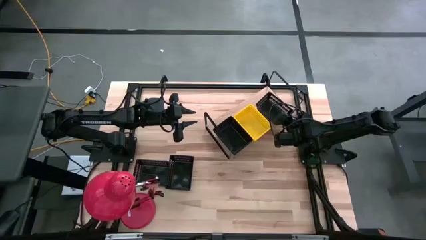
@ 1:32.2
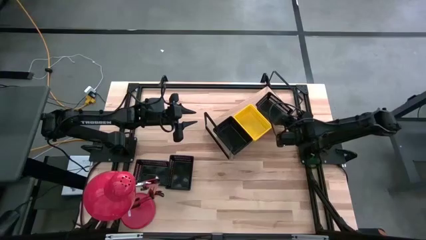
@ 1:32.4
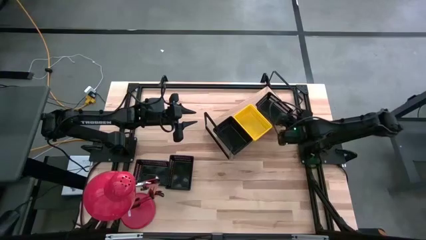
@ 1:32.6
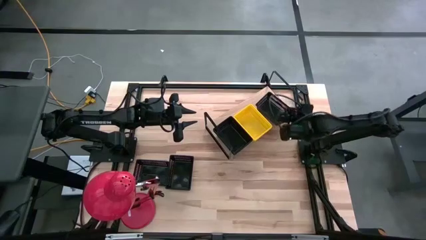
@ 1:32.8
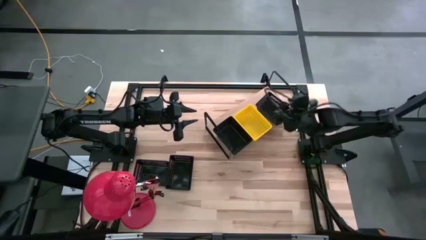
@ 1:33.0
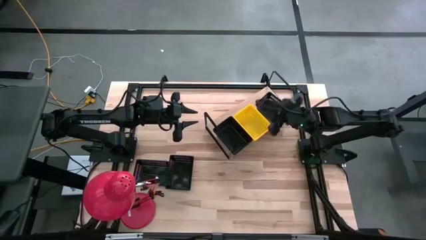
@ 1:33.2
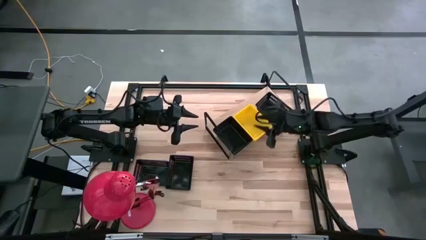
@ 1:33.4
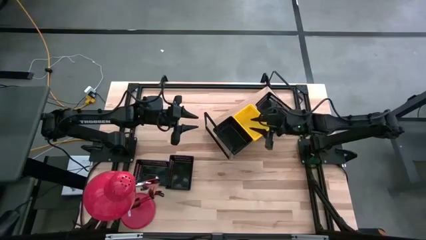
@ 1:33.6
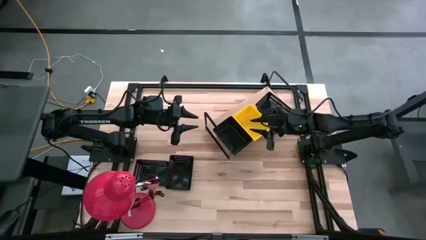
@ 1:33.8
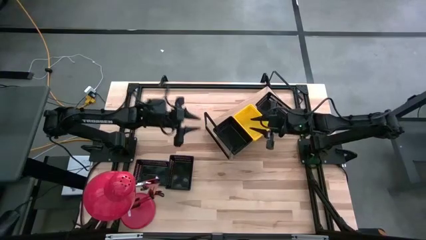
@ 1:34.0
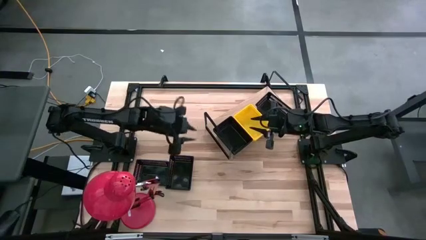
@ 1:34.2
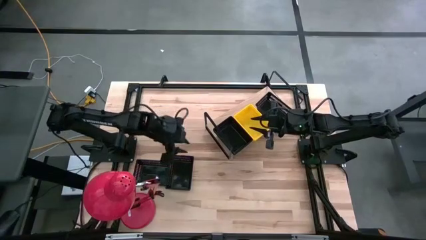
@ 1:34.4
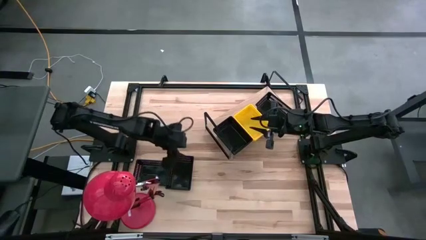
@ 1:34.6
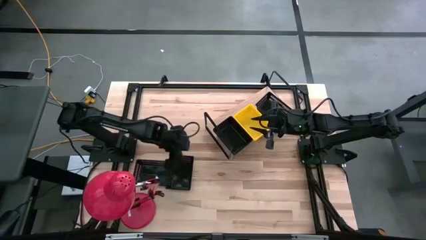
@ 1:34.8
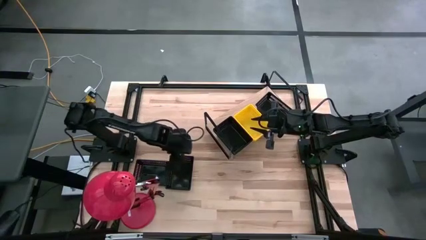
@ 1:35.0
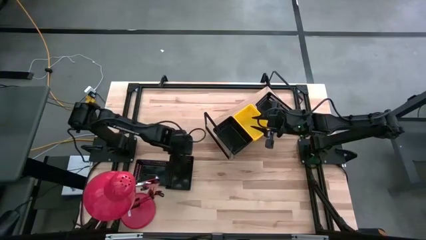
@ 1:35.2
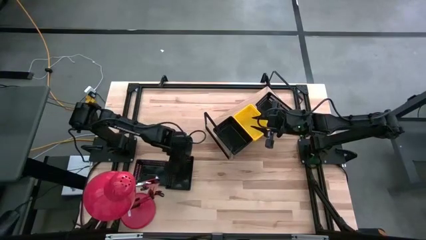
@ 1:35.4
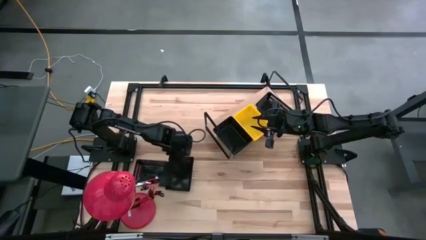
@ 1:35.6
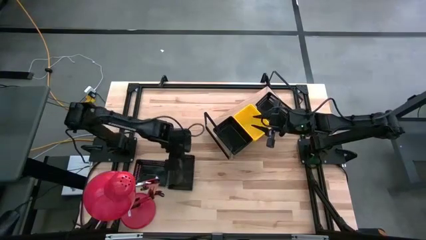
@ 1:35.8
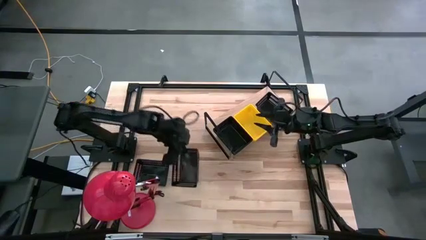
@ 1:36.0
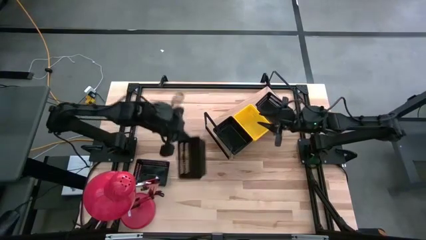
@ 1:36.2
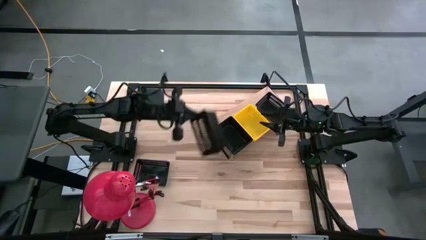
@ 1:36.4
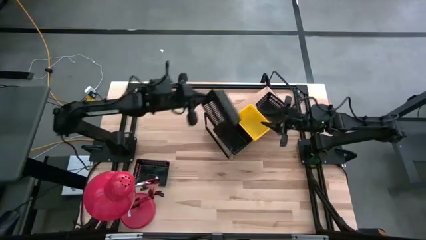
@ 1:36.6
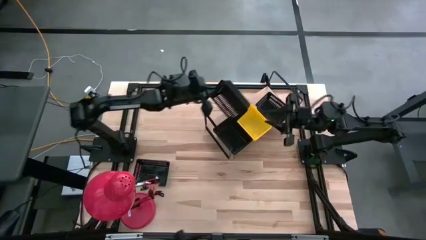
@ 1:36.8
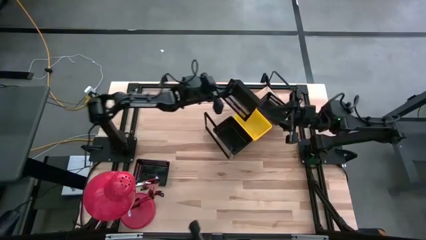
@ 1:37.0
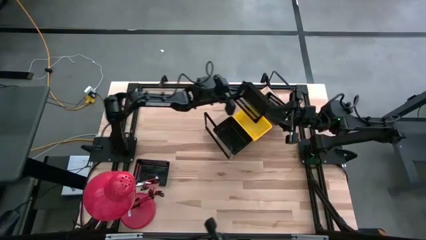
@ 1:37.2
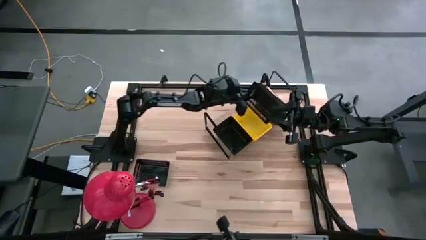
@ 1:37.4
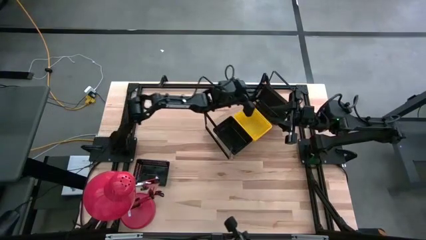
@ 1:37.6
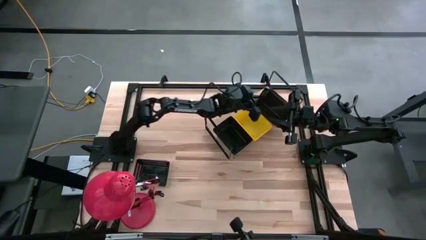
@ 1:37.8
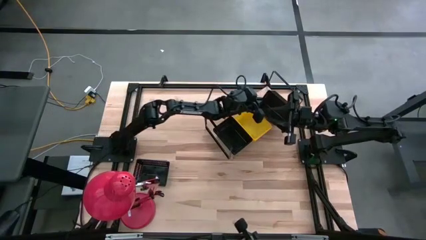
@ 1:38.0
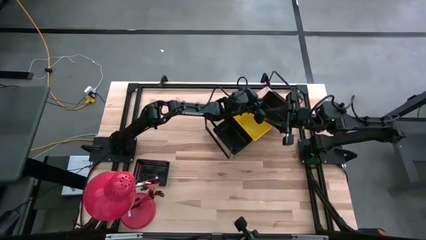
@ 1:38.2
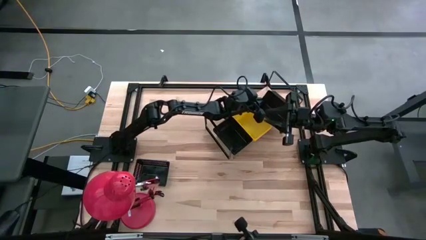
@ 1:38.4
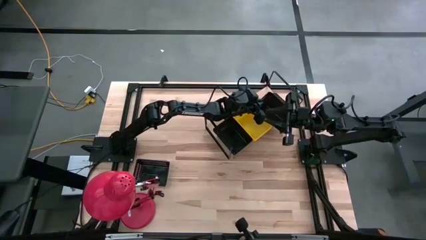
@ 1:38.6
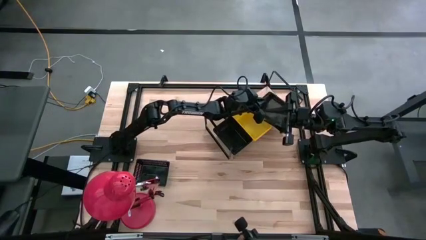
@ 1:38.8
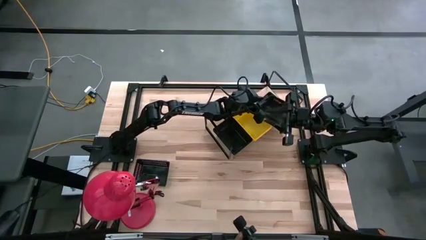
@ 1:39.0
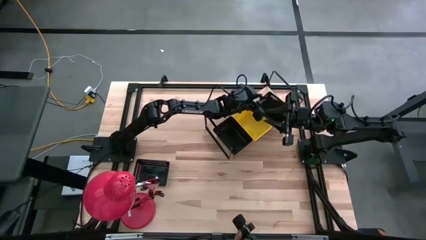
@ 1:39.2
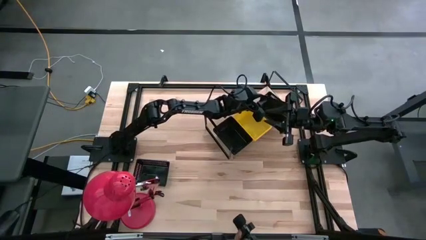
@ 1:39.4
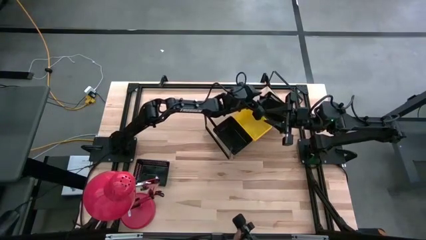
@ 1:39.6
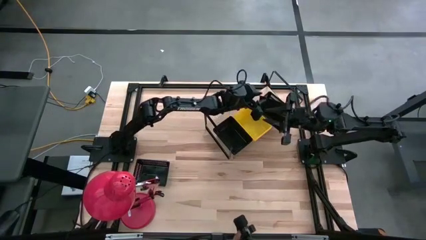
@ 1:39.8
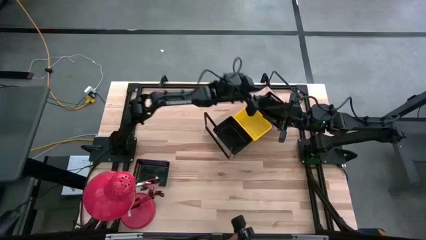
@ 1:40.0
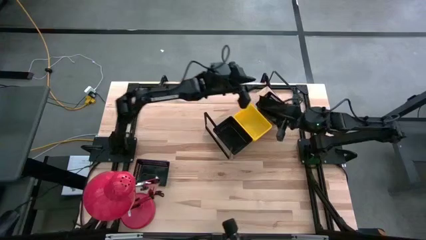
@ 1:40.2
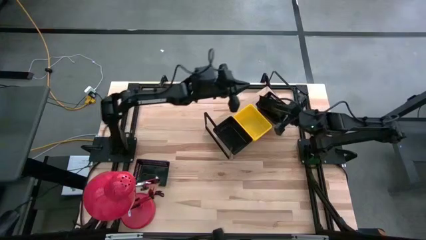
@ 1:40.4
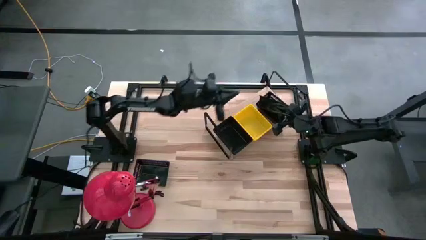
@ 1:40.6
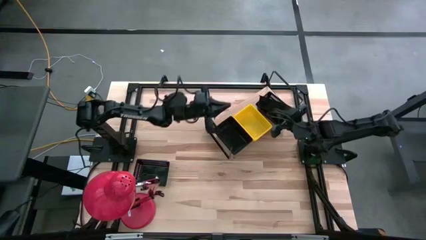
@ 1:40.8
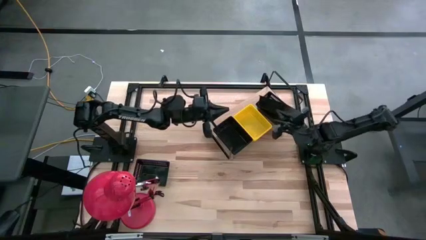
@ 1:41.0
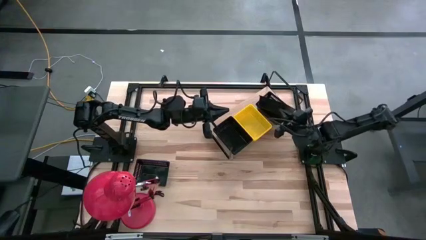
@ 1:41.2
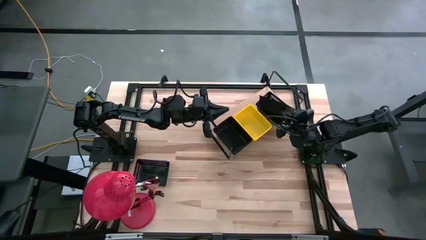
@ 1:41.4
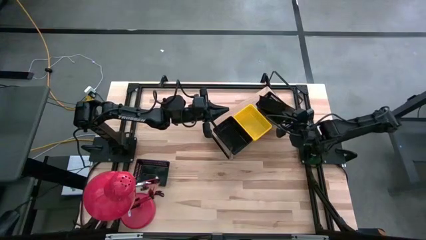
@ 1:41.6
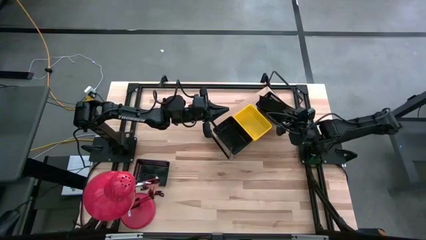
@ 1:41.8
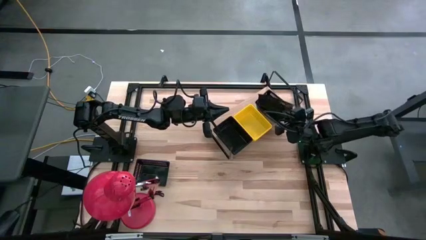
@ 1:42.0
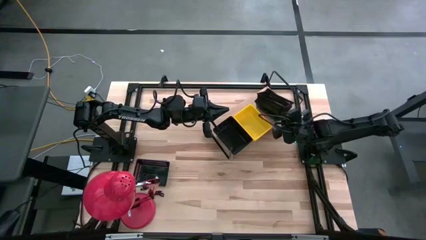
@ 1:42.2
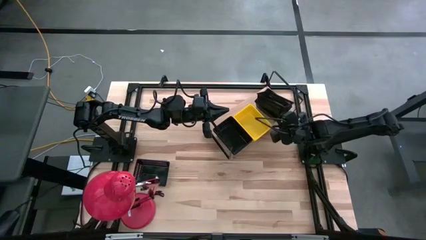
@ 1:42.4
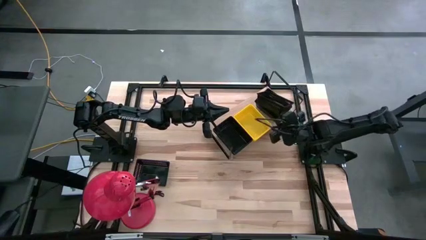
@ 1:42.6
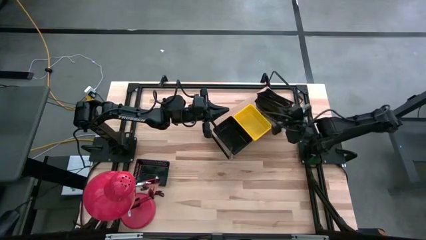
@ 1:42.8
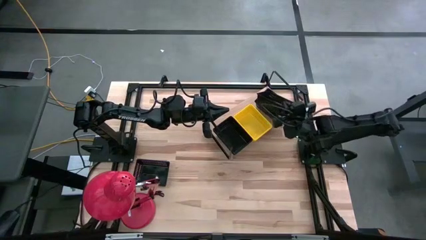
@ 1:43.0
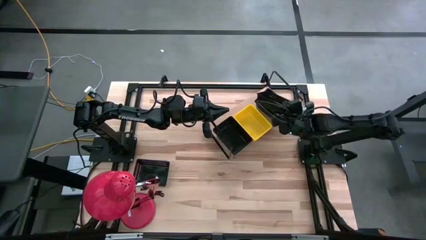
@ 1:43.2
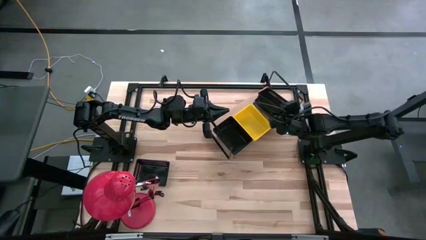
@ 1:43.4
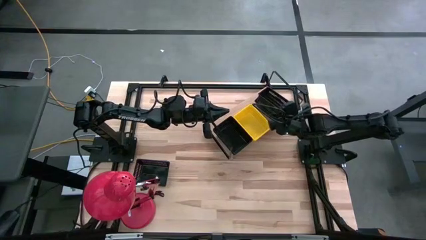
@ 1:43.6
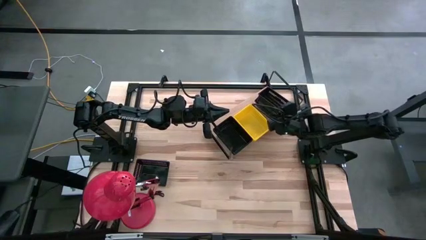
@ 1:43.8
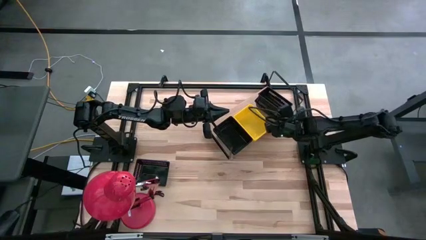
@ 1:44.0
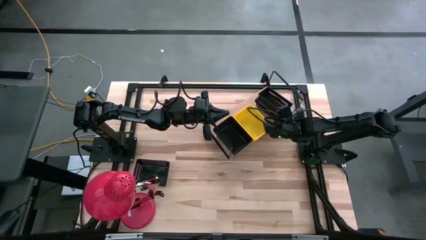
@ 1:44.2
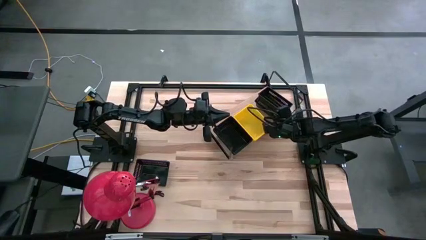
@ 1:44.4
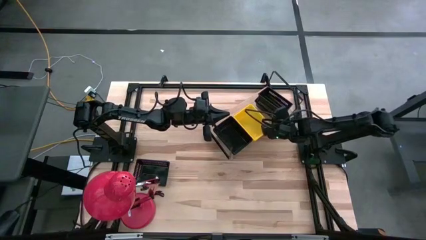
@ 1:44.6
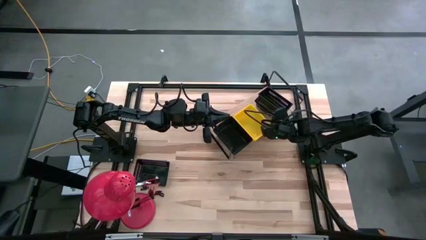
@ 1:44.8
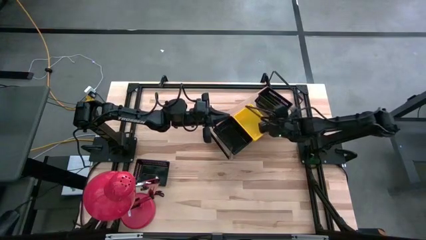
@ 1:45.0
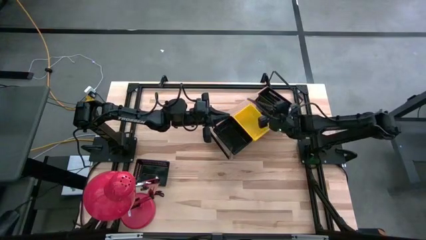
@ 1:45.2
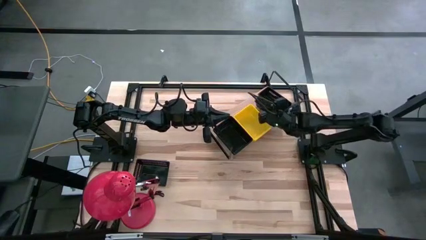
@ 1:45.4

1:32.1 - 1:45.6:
Task: Stack baskets on shelf by color
Stack the black bin on top of the black bin on the shelf

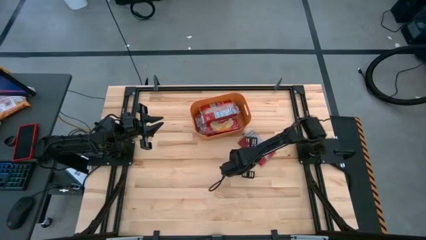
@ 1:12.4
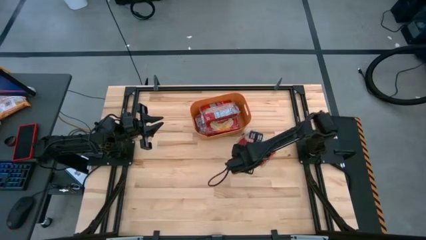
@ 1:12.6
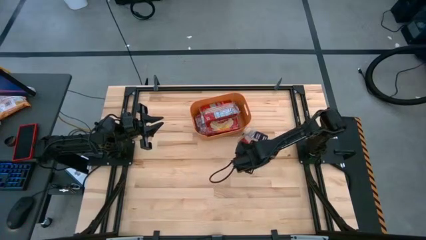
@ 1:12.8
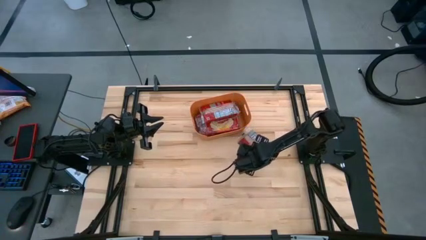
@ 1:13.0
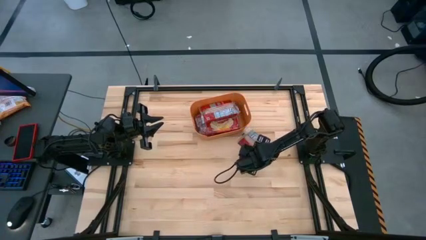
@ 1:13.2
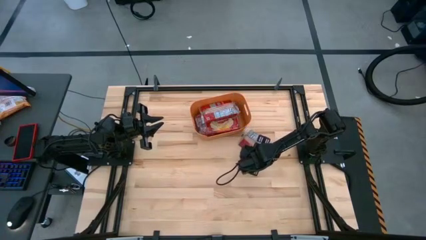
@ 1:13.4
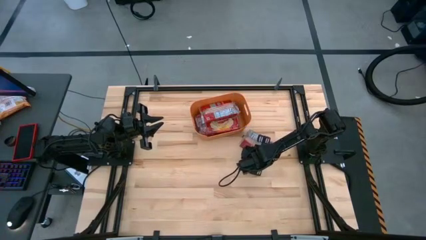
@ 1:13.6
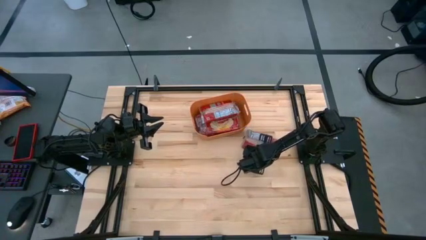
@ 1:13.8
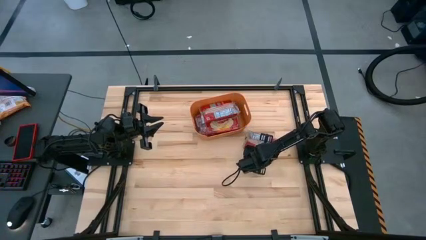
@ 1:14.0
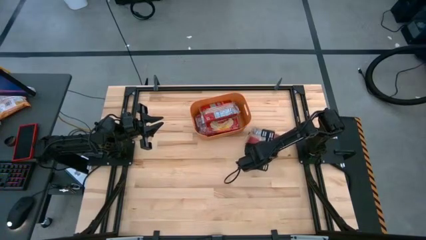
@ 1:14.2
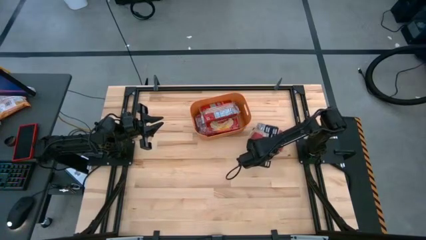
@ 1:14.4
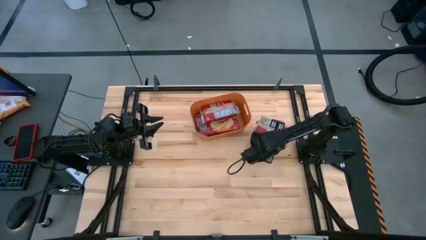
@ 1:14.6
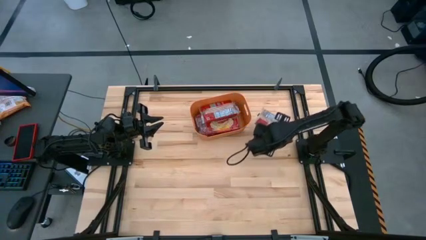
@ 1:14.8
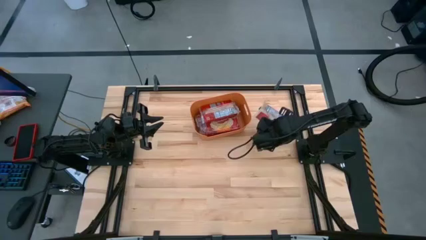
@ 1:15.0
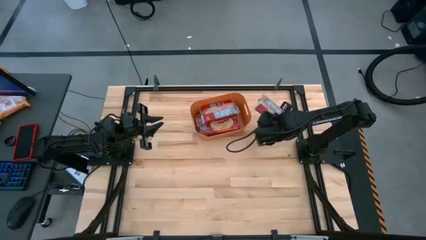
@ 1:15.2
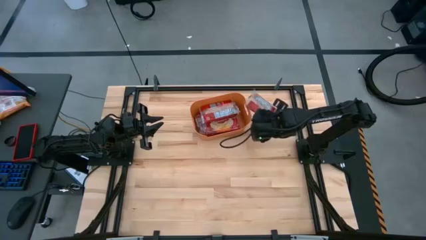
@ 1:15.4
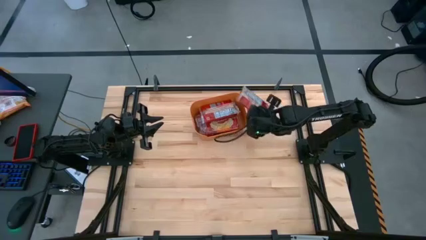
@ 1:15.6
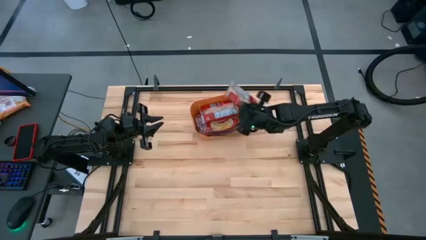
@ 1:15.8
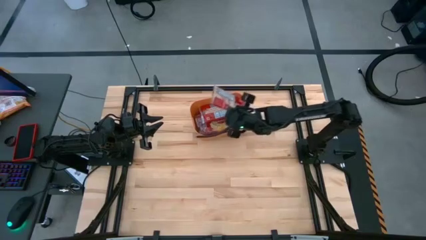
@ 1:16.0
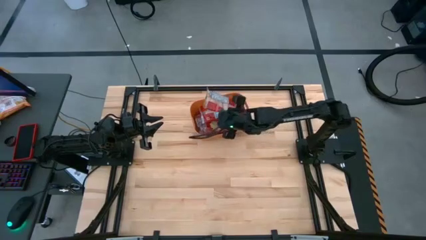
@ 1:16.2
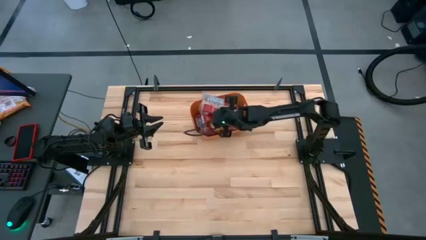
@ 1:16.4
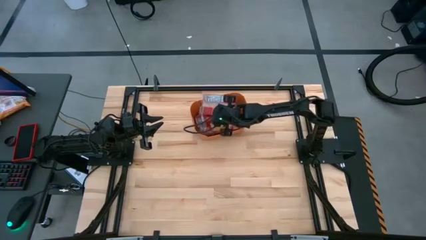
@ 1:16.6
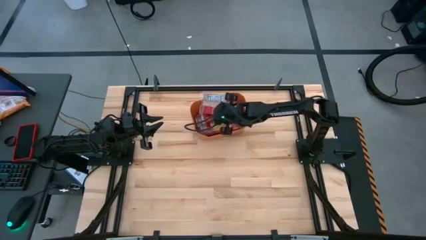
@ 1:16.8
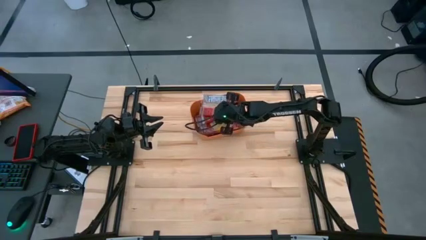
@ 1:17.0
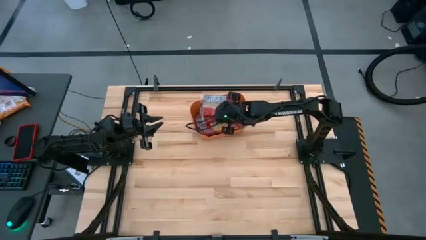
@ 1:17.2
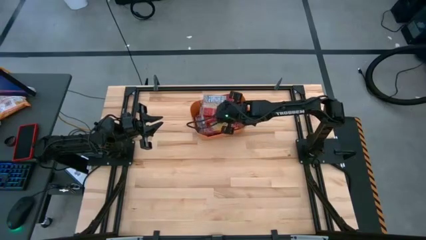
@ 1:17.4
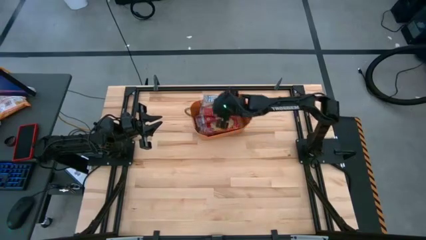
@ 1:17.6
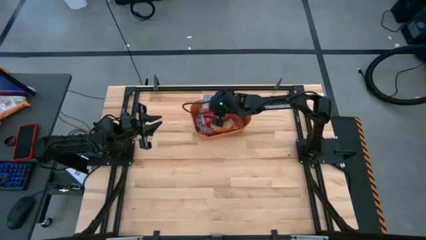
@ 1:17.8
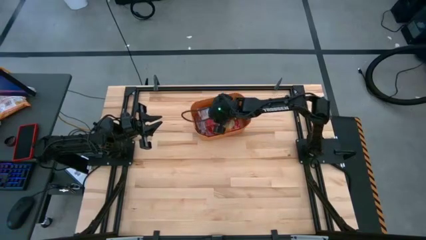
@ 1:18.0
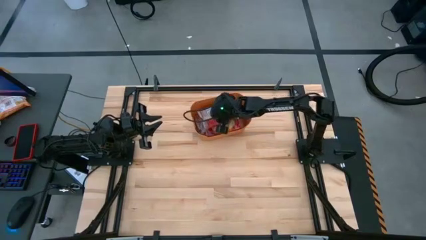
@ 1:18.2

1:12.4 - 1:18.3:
Task: Sort popcorn bags into baskets
Put the red popcorn bag into the orange bin
